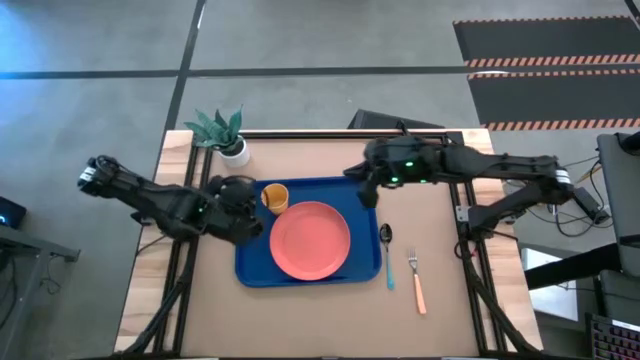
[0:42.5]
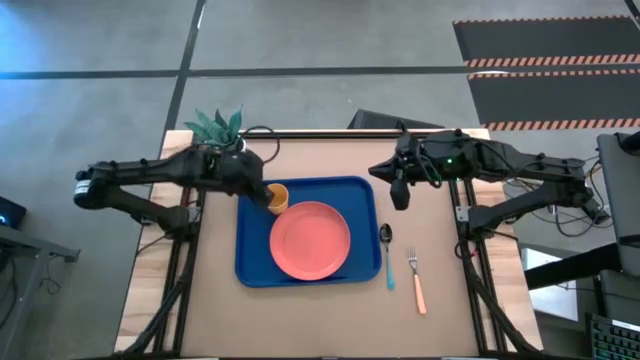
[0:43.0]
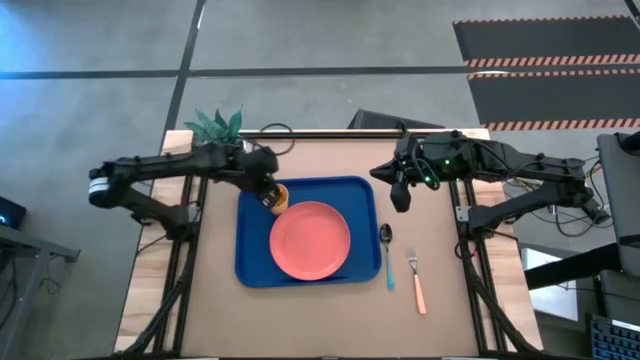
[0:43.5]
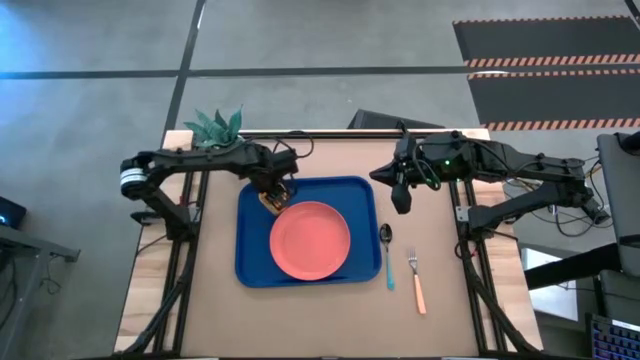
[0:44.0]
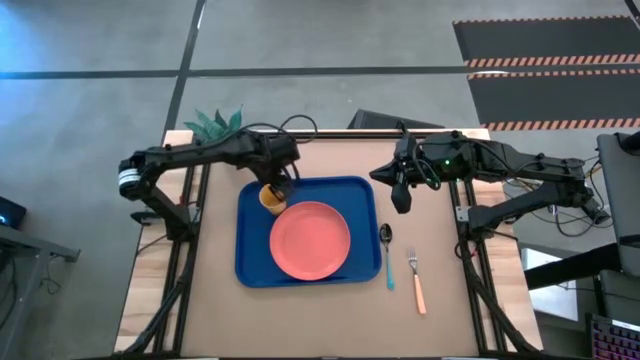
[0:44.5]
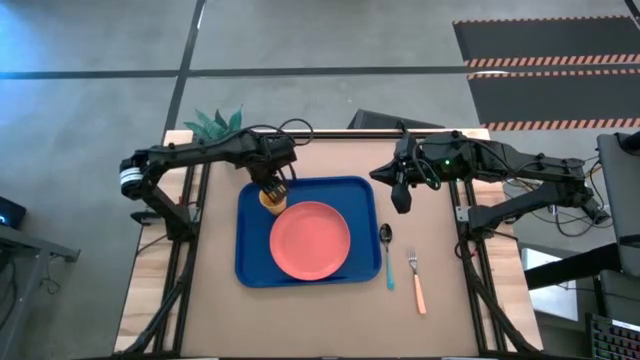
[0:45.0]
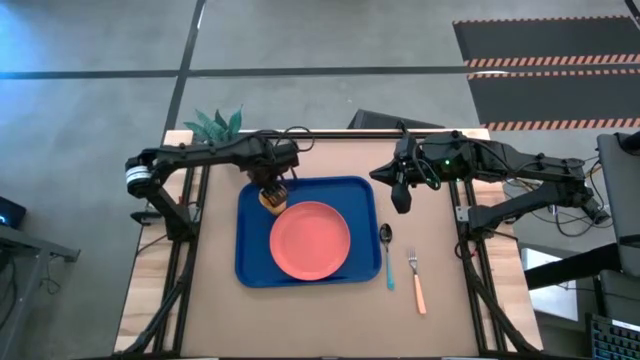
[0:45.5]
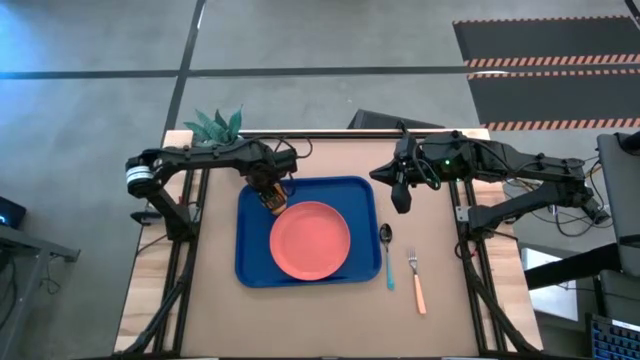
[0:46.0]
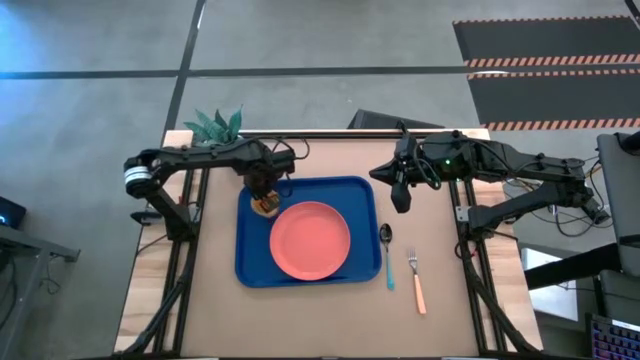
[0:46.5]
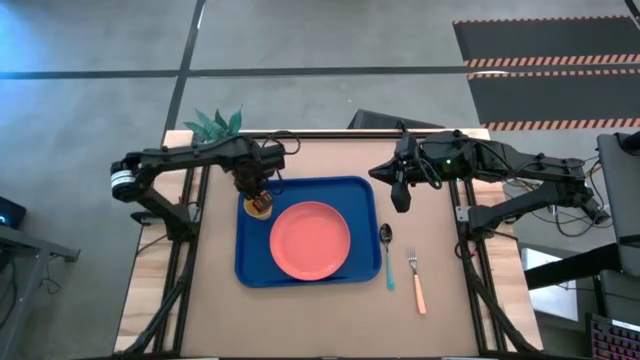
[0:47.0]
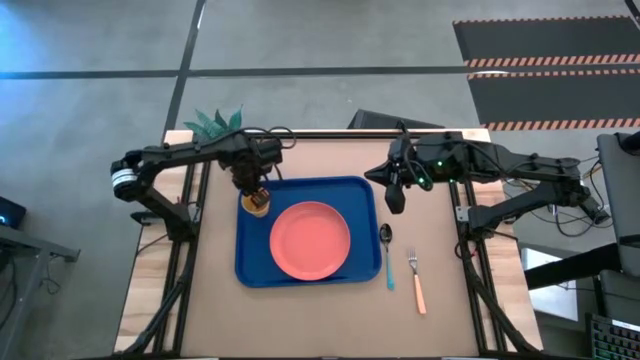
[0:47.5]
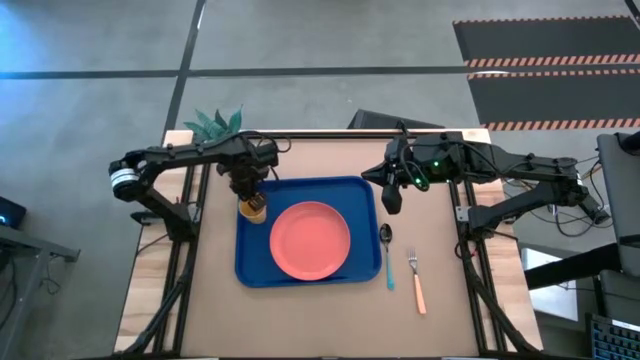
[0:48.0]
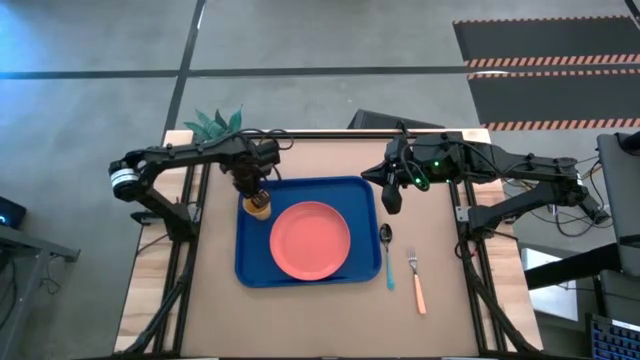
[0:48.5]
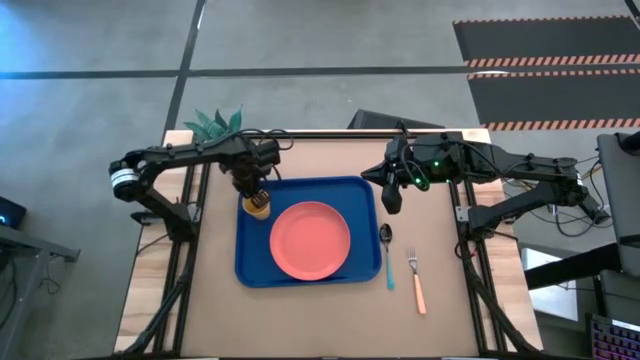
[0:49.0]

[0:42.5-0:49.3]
Task: Pick and place plate/cup/fork/spoon on tray
Adjust the yellow cup

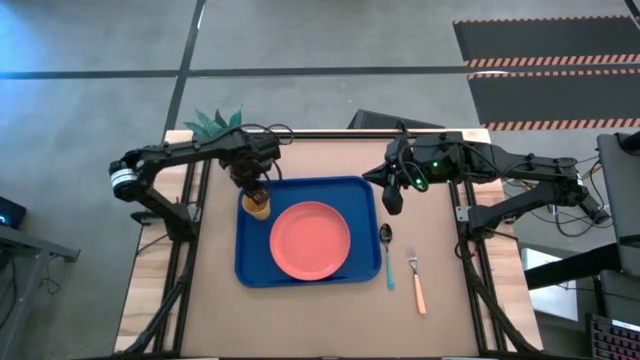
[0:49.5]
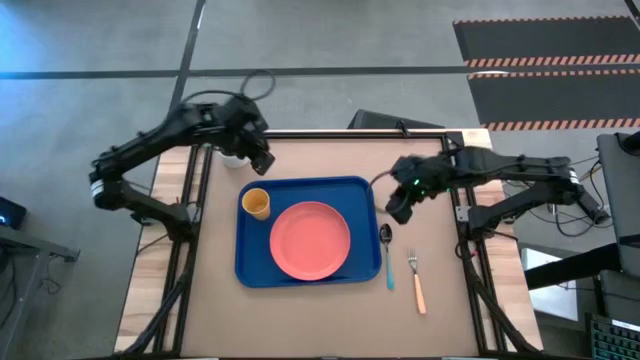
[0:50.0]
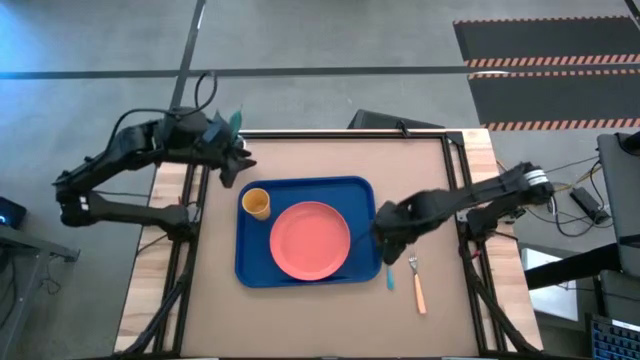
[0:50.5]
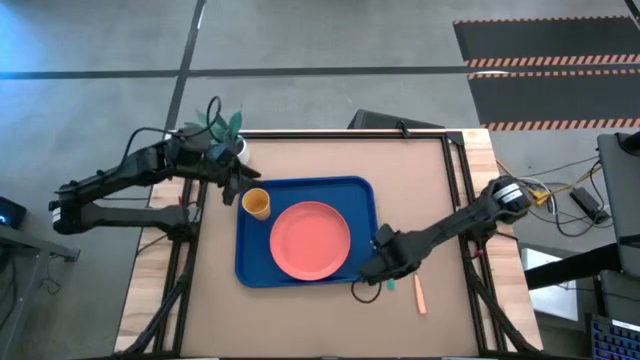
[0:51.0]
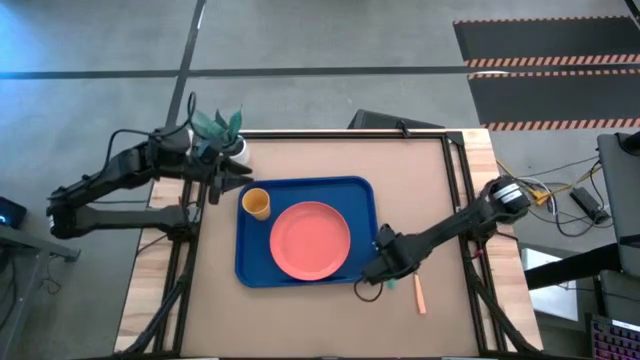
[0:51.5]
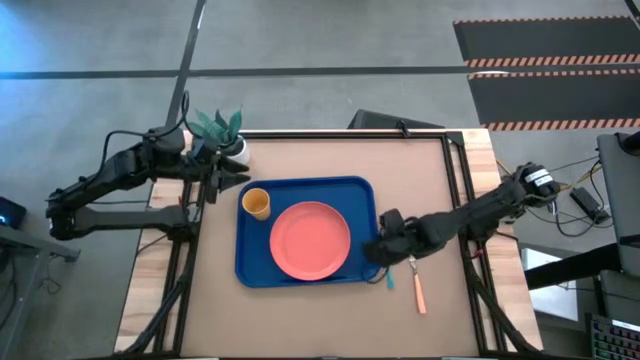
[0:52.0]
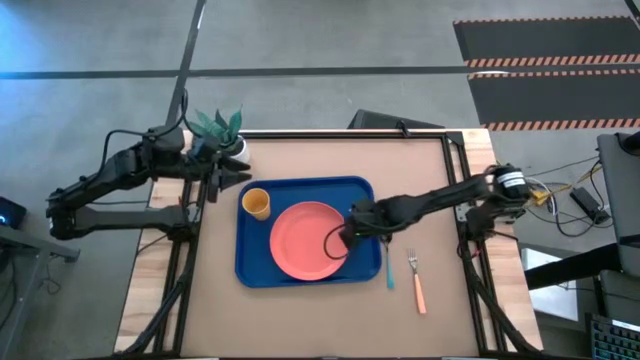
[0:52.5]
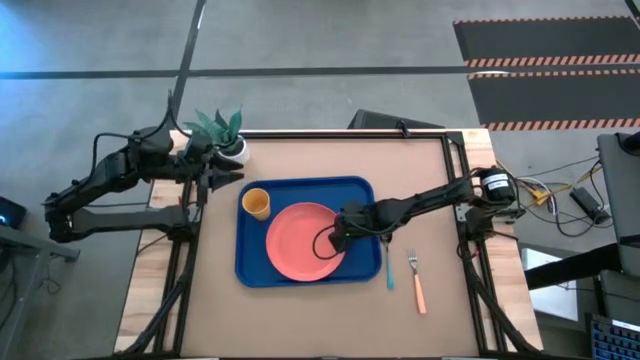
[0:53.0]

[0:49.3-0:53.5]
Adjust the pink plate

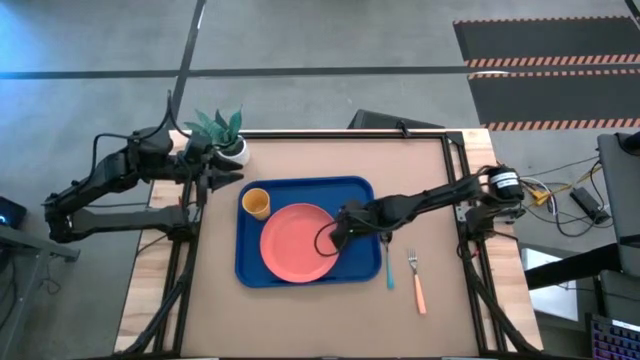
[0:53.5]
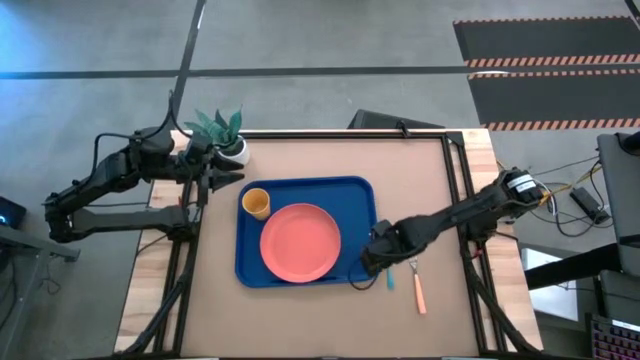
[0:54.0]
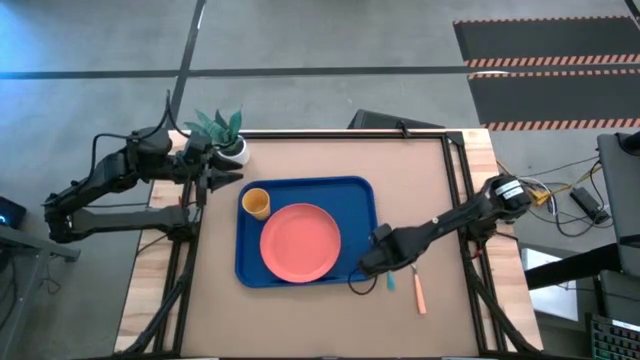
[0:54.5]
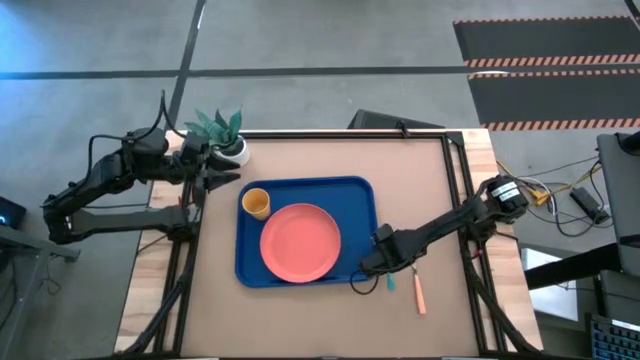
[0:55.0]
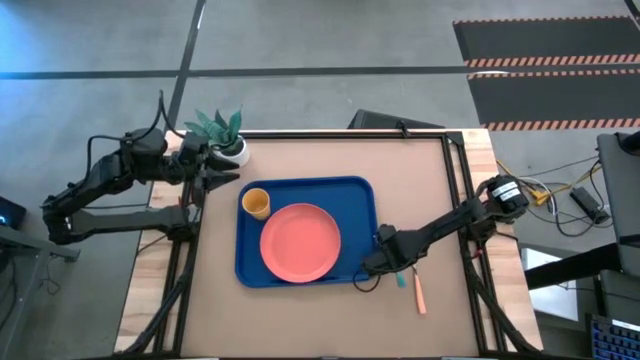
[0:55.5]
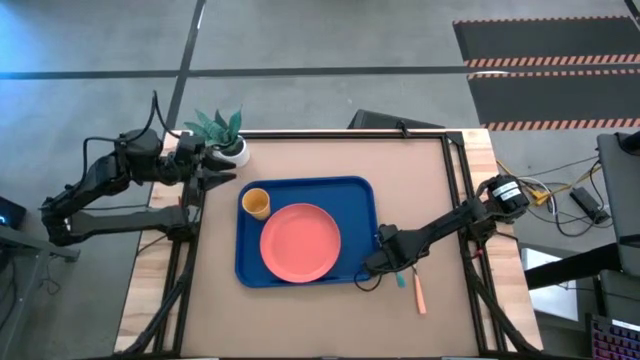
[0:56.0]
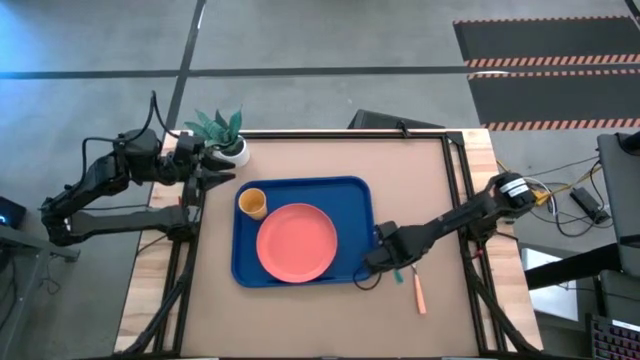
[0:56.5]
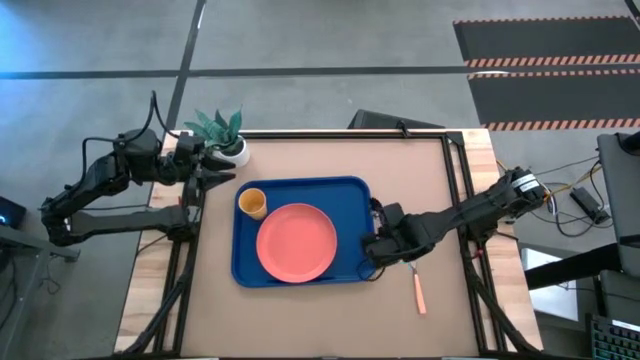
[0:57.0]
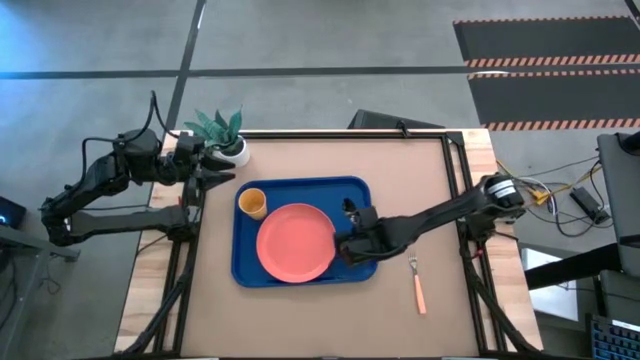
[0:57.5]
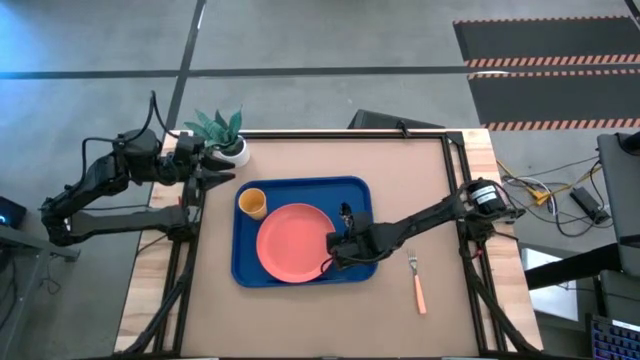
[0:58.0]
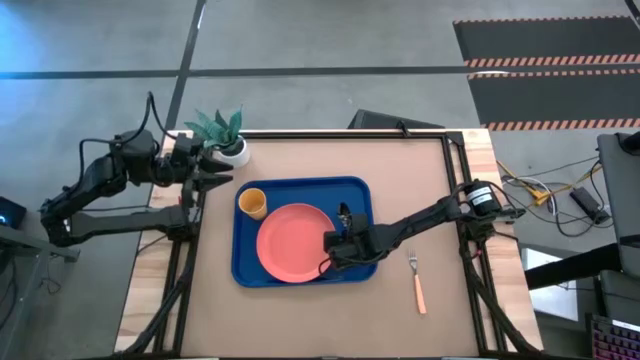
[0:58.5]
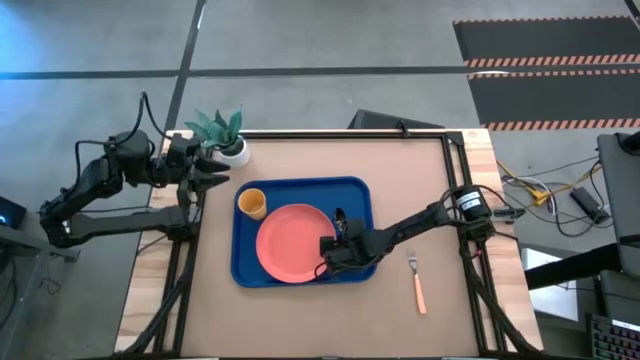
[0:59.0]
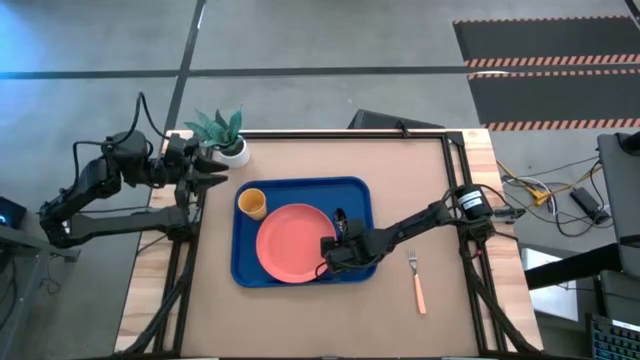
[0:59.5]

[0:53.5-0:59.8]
Put the blue spoon on the blue tray to the right of the pink plate

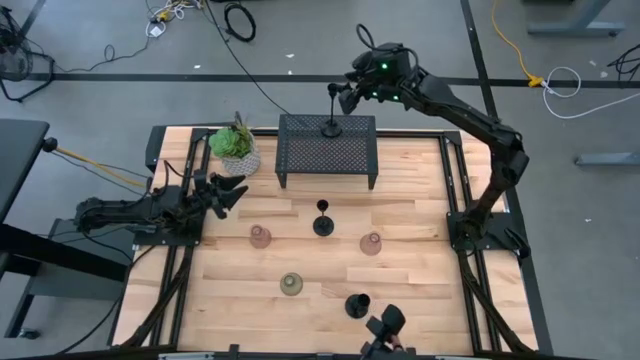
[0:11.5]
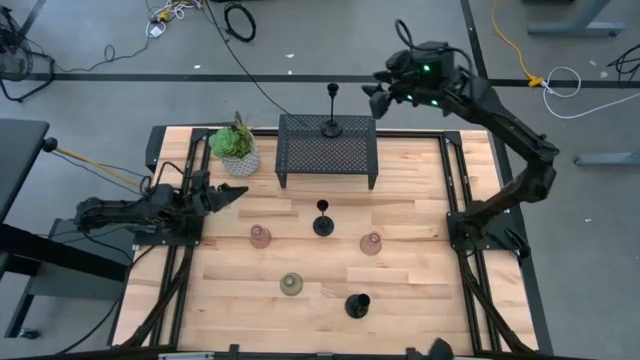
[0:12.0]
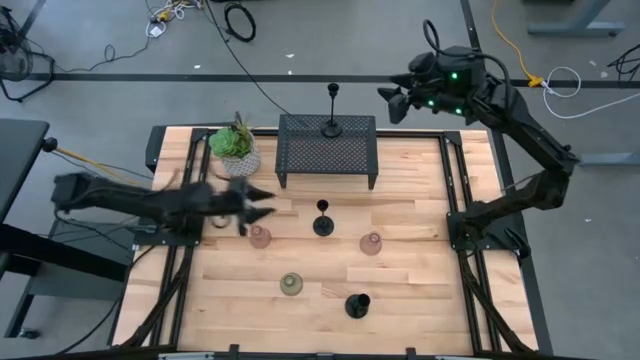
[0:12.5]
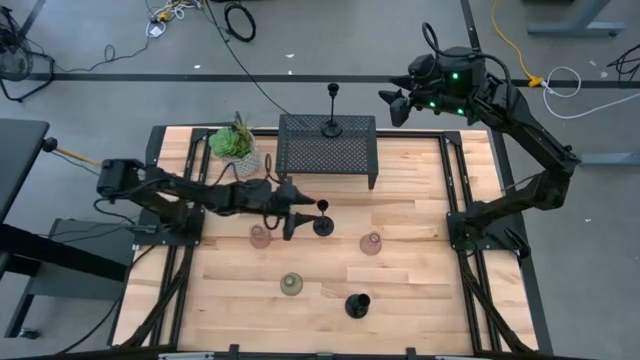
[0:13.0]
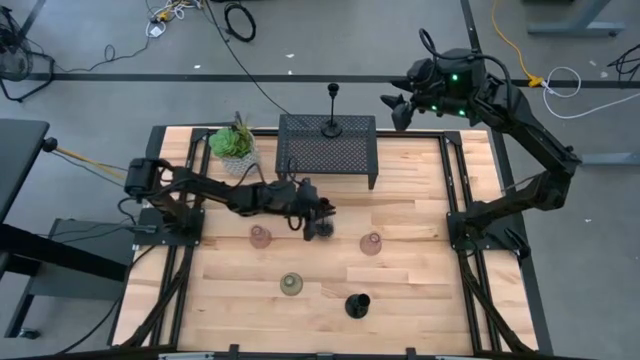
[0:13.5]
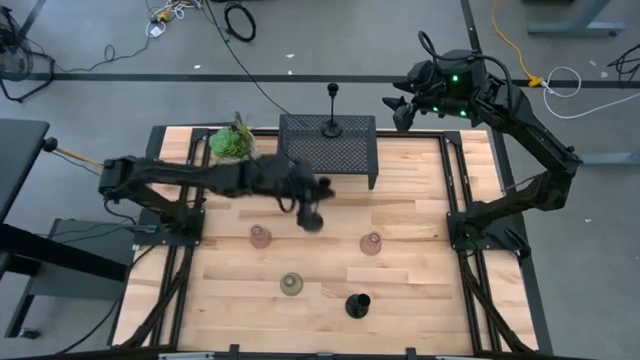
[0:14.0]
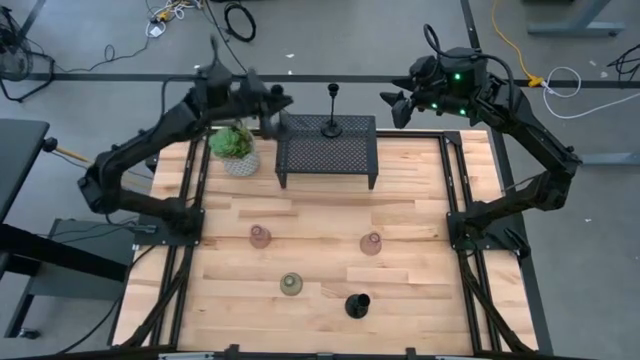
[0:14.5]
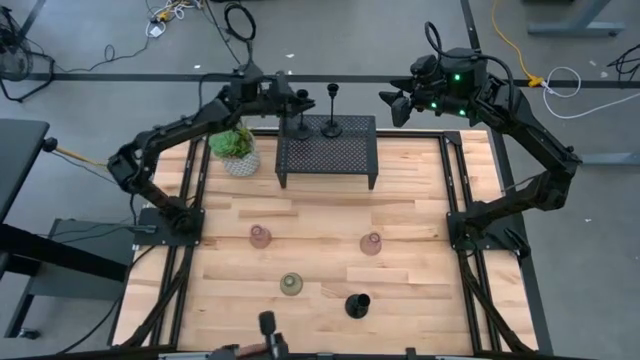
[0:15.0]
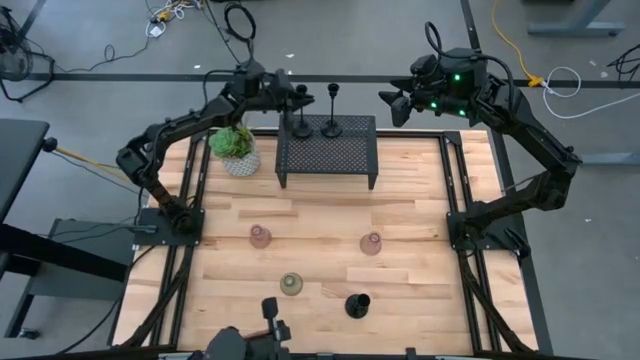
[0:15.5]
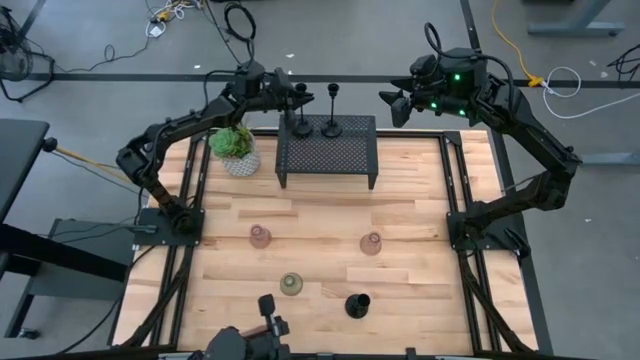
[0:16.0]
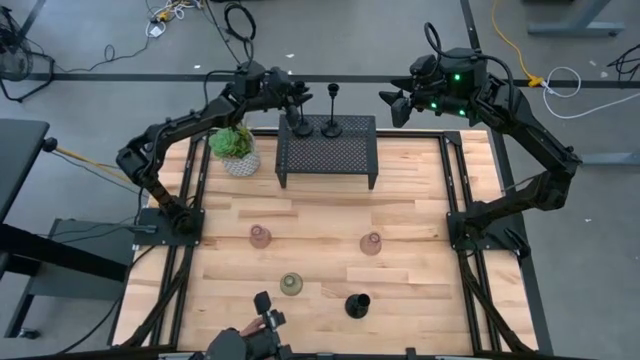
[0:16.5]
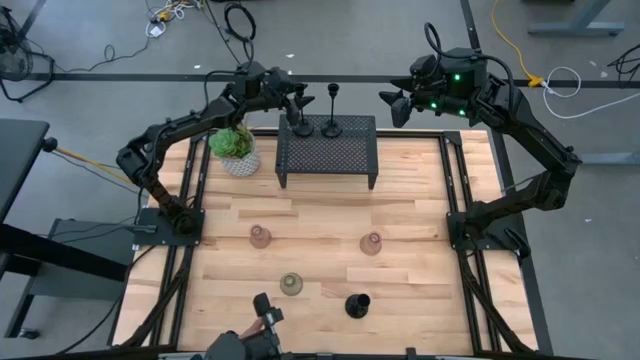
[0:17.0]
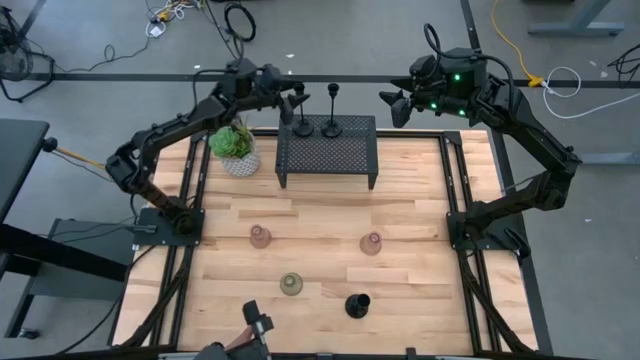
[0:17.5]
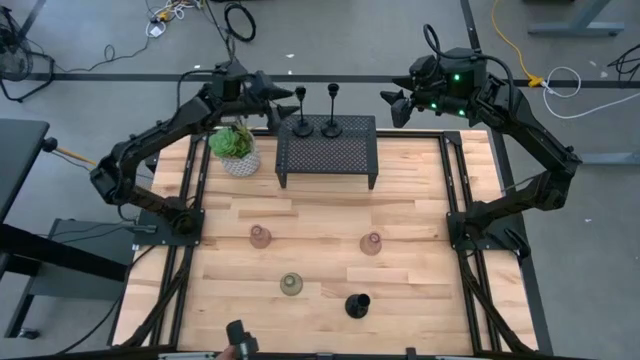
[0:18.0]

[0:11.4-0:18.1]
Task: Pick & Place candle stick holders
Put the top black candle holder on the shelf aligned with the other black candle holder
